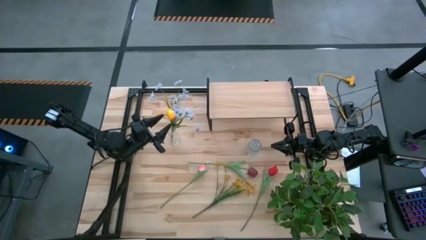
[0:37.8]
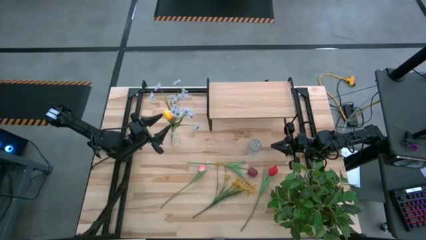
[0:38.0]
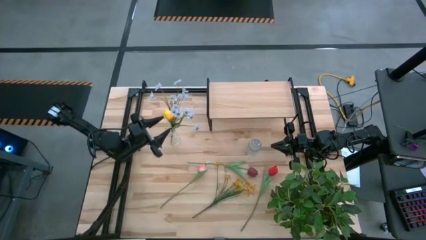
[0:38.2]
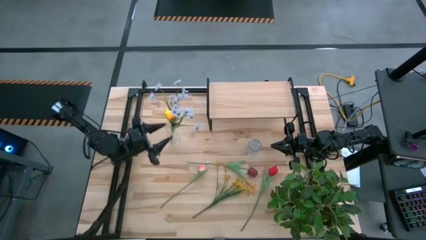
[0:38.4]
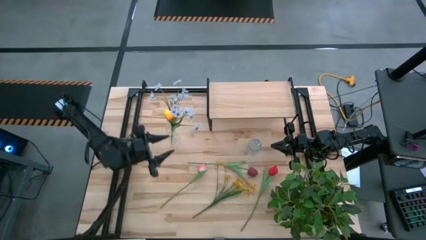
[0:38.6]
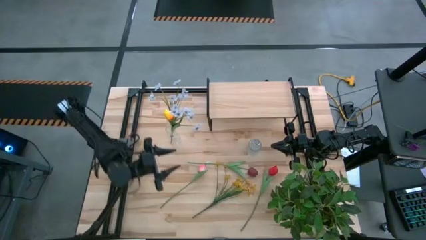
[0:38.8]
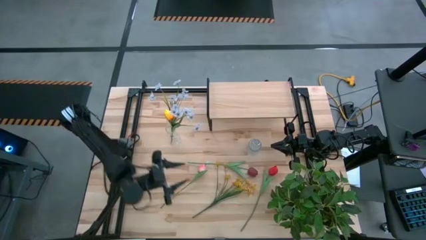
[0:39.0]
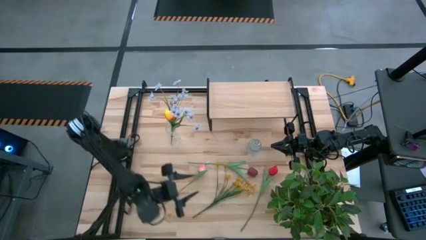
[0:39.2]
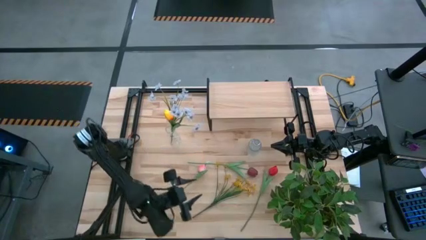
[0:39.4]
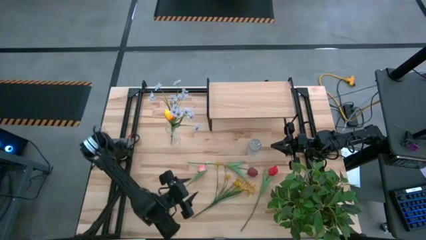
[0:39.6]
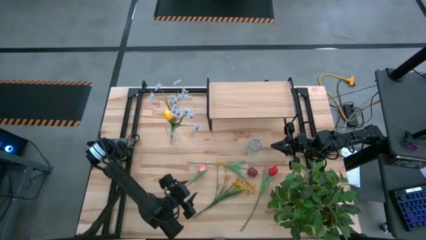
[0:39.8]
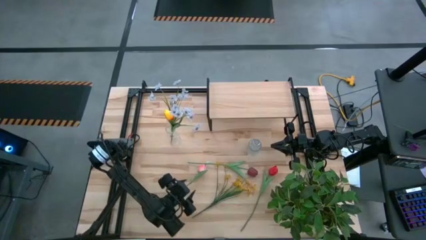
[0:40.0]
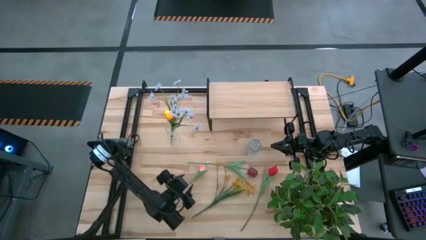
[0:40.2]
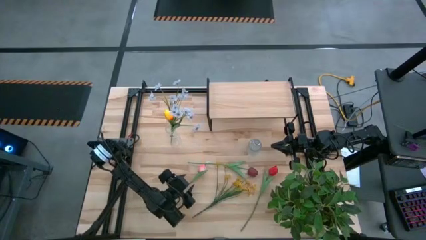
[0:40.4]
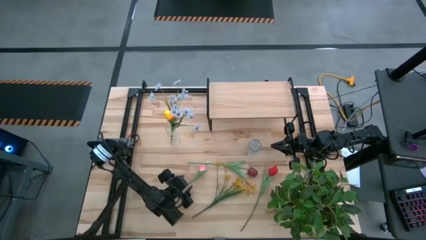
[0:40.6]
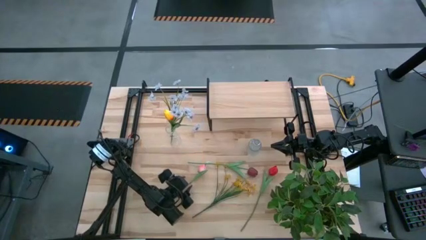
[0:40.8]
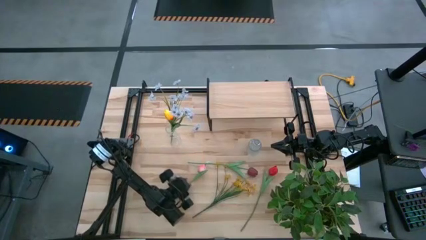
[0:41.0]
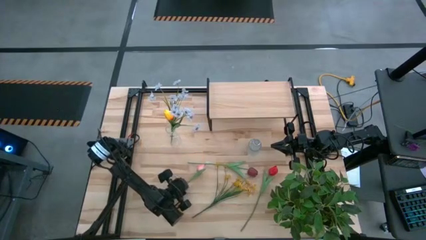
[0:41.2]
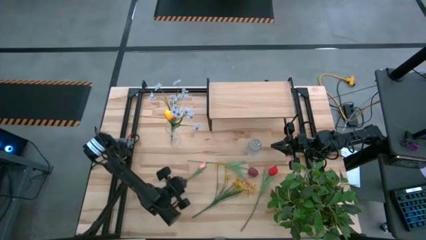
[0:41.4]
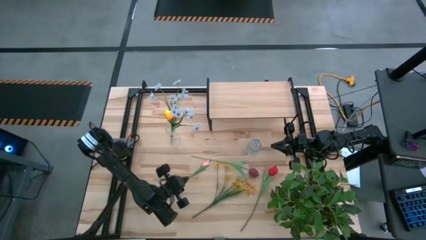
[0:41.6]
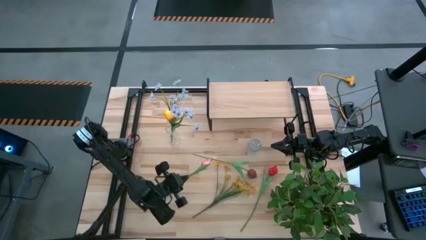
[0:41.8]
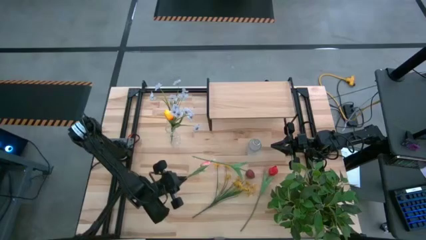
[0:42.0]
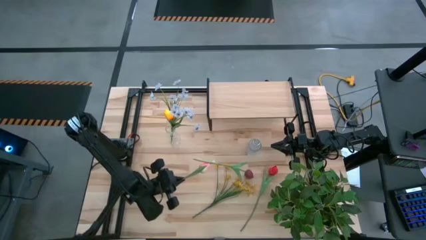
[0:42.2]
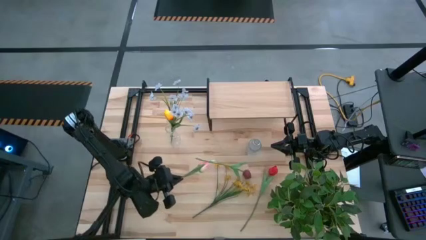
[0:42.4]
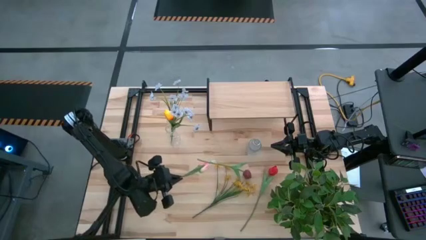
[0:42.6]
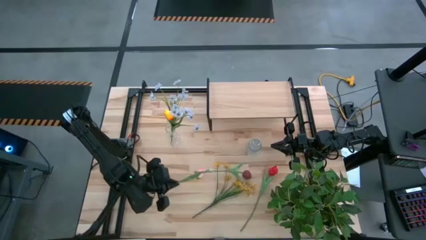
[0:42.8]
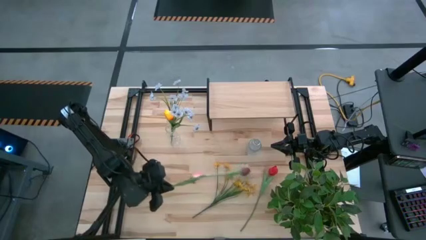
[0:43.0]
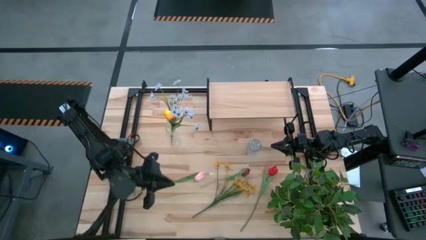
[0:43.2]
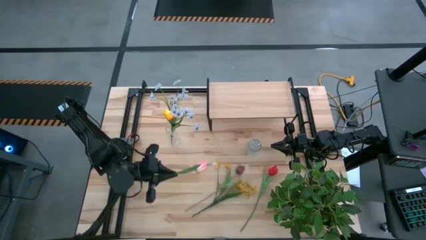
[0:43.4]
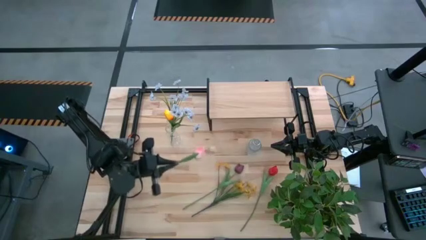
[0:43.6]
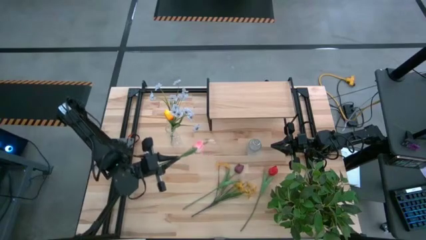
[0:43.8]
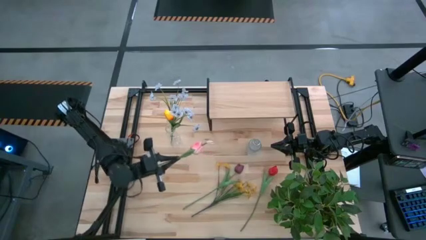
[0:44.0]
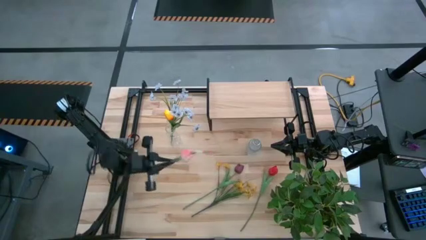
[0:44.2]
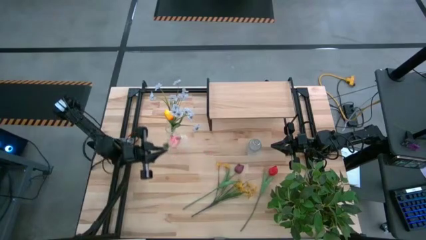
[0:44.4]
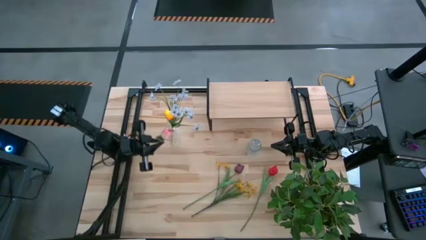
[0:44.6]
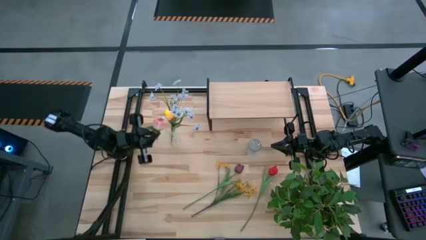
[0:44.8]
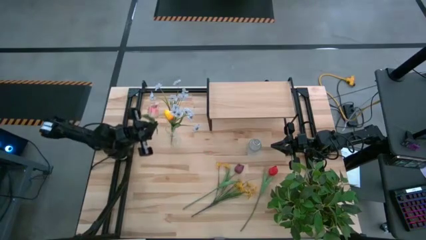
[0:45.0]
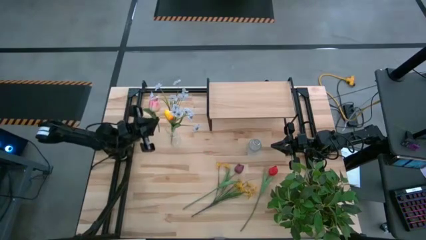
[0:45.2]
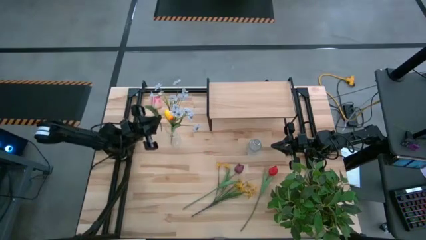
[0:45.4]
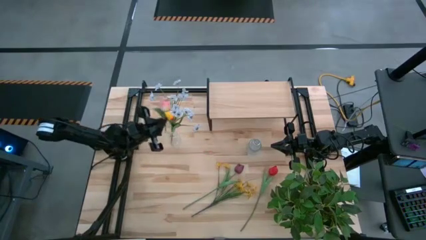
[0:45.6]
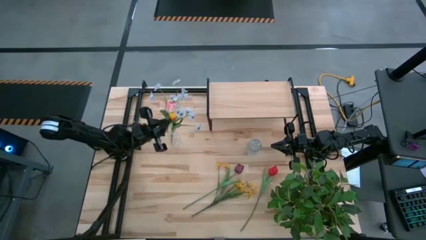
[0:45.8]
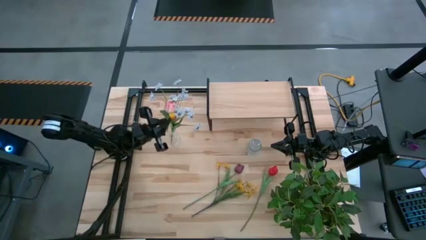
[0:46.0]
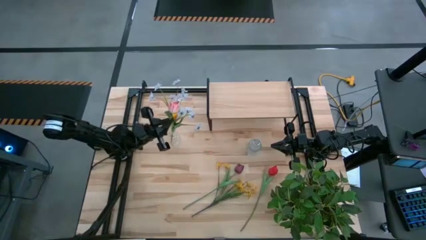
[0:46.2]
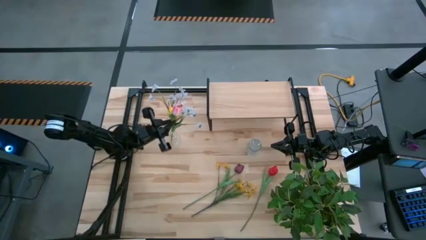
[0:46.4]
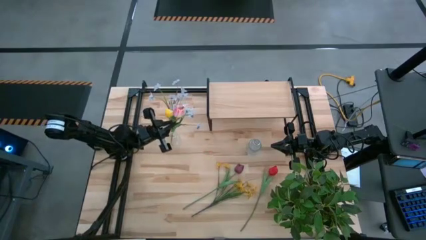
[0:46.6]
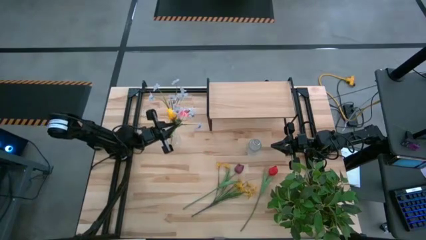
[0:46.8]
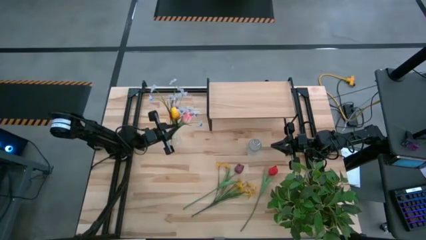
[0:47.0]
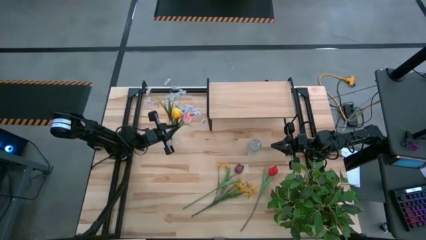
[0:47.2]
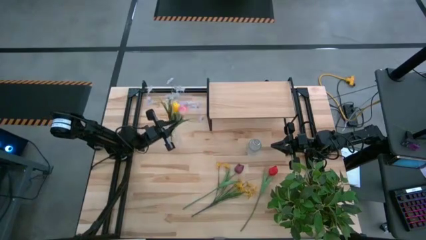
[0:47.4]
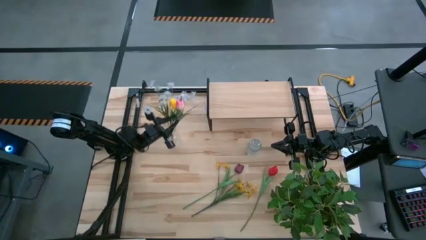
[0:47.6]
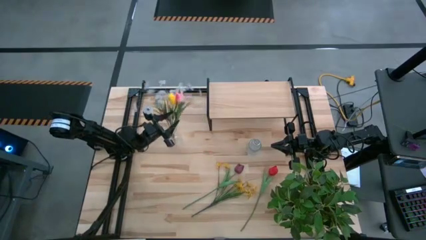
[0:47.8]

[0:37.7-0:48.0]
Task: Pick and place flowers into a vace then onto a shelf
Put the pink flower into the left transparent vase

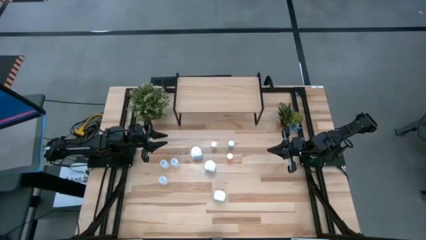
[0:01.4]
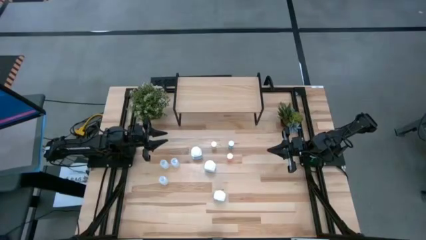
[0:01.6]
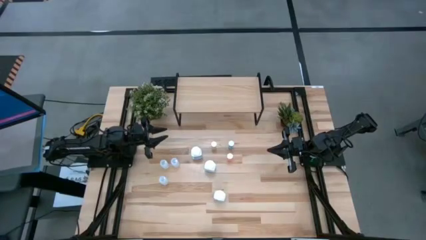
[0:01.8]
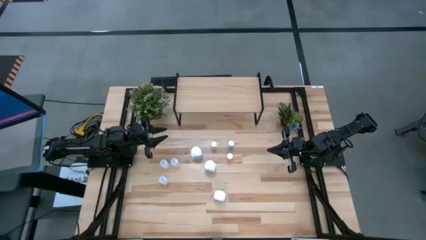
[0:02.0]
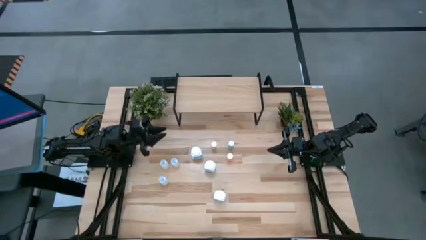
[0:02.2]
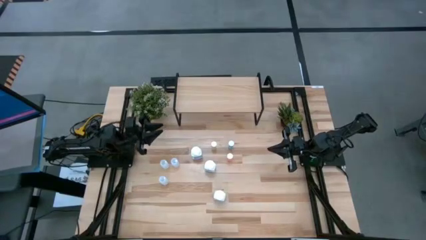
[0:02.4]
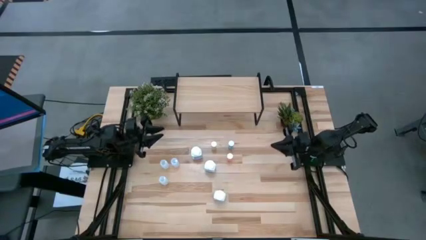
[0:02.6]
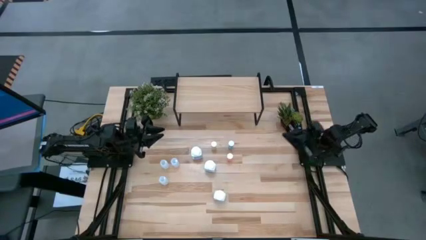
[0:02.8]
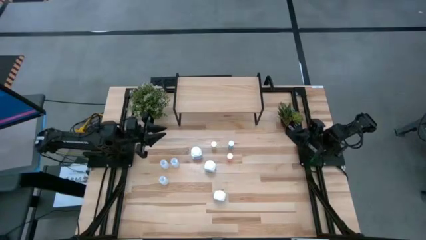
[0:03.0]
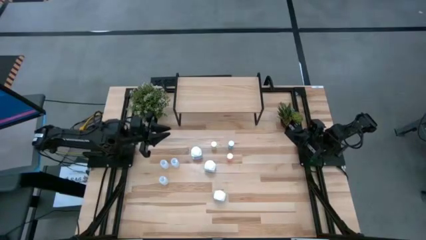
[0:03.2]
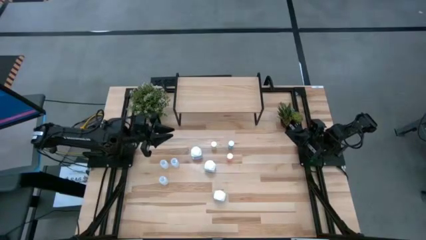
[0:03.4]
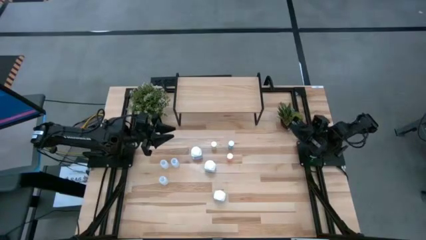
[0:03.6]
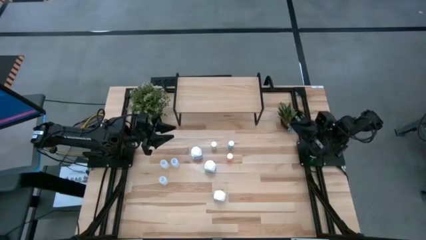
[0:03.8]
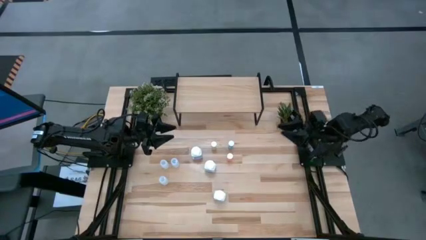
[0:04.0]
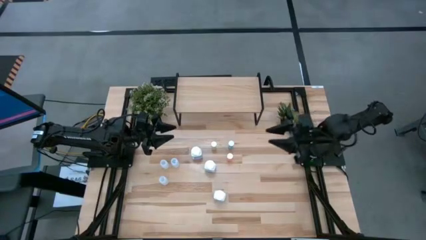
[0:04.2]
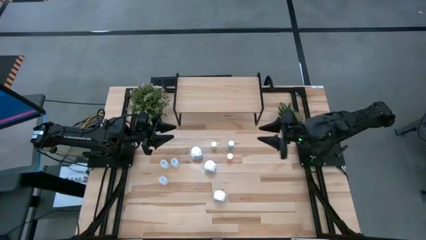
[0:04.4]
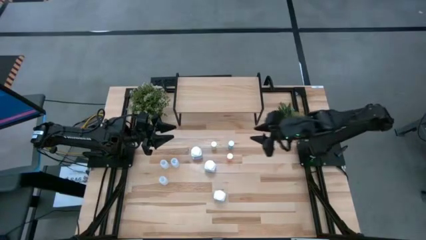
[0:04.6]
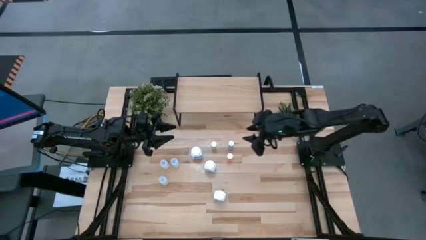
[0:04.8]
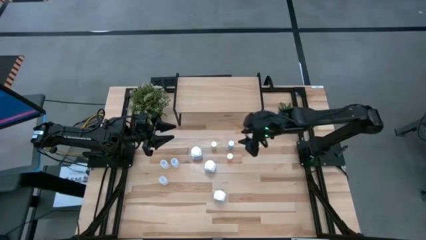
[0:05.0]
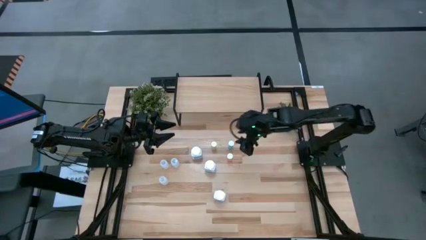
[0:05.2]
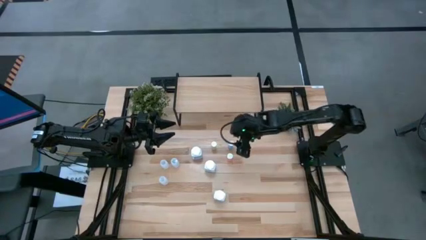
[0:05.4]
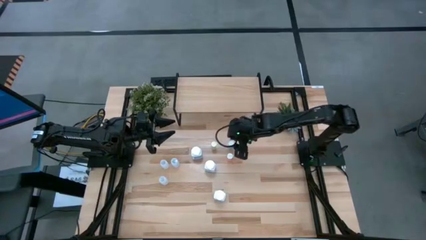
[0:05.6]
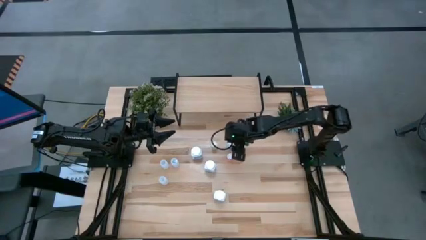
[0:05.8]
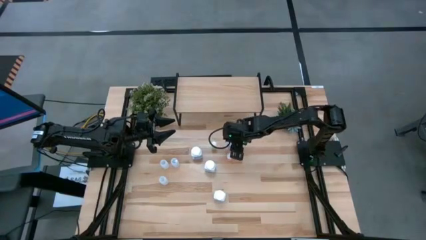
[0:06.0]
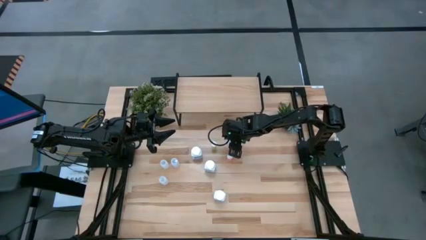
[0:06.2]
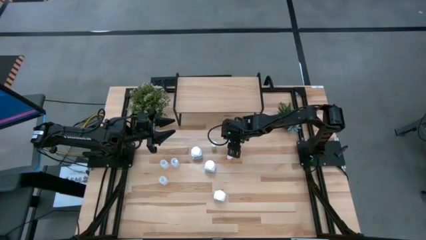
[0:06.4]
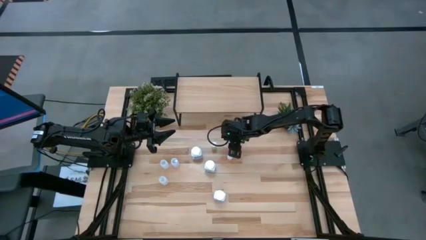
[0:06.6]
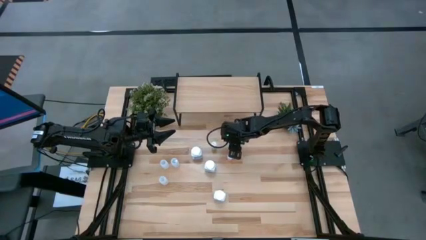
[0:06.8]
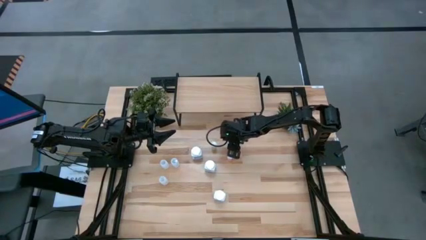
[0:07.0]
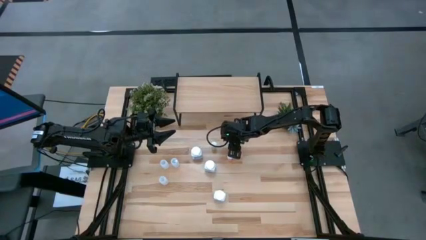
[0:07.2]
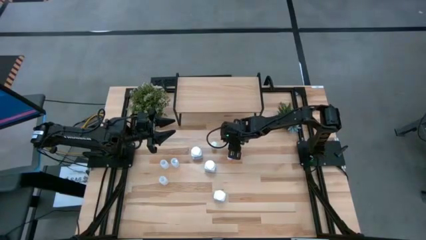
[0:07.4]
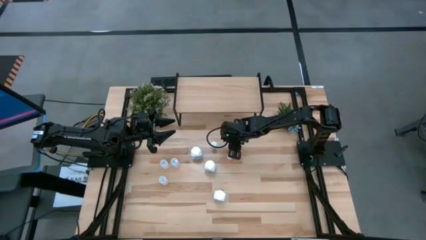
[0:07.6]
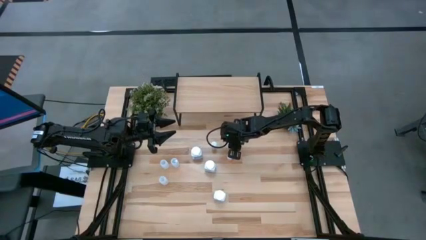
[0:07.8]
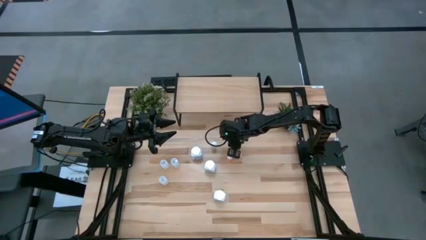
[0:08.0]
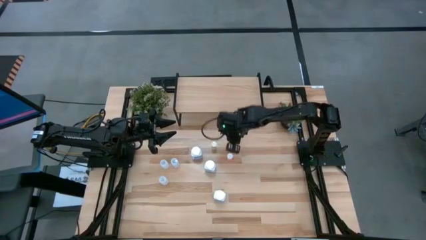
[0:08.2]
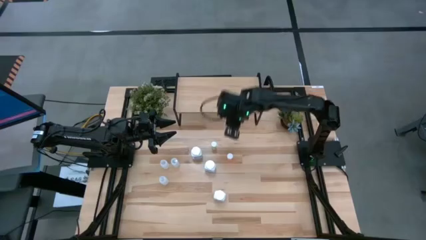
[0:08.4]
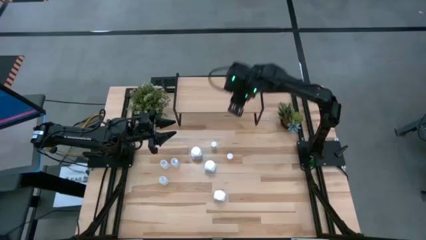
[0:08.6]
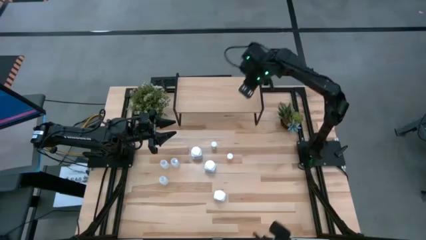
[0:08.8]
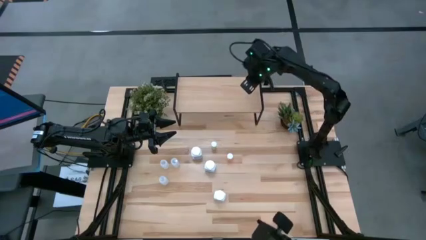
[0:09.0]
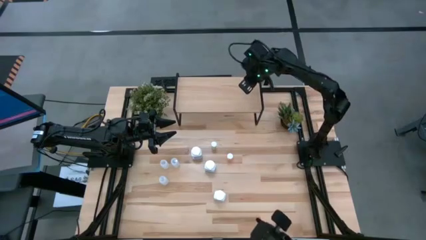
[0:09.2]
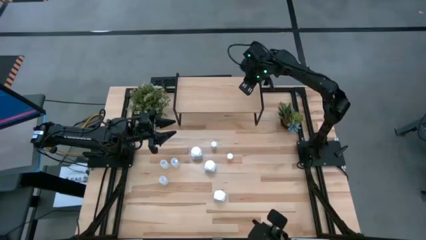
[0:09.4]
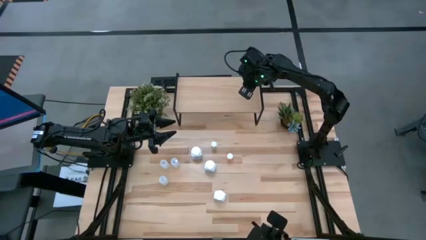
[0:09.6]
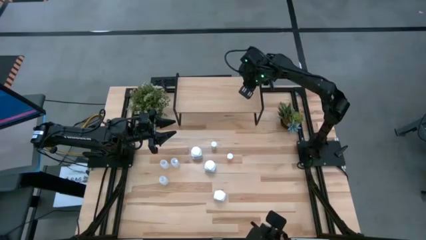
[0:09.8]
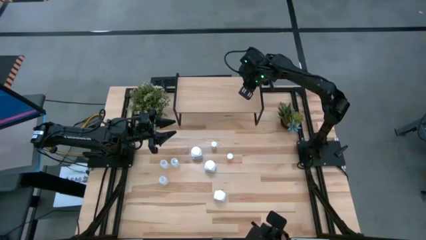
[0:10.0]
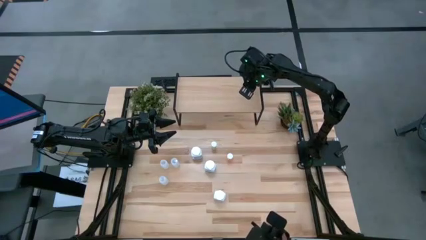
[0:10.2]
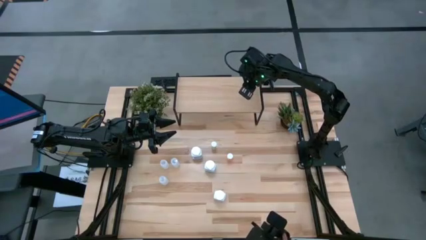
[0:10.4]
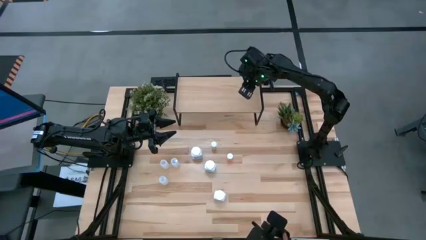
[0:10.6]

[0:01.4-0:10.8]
Task: Pick and place medicine bottles onto shelf by color
Put the blue pill bottle on the shelf
